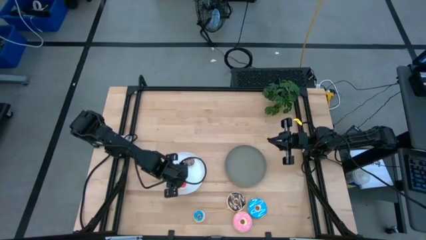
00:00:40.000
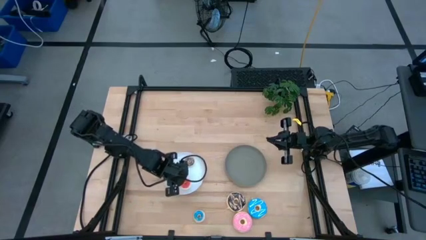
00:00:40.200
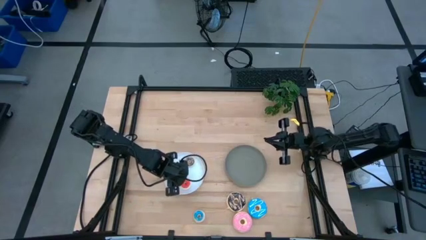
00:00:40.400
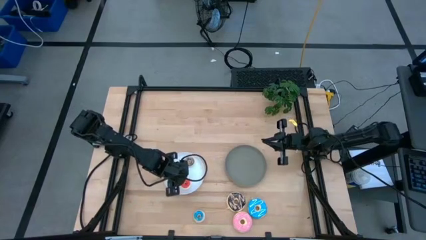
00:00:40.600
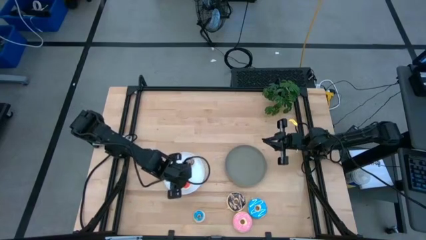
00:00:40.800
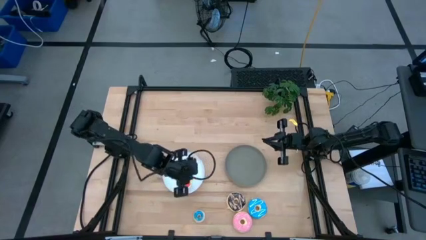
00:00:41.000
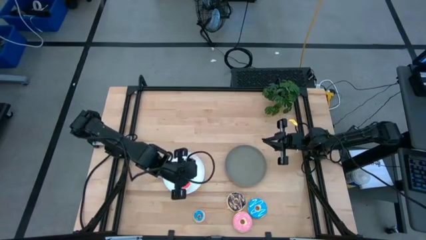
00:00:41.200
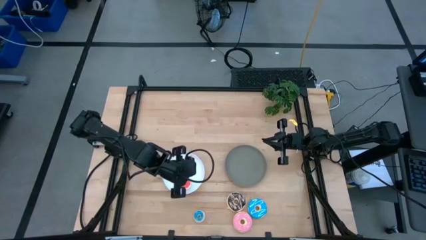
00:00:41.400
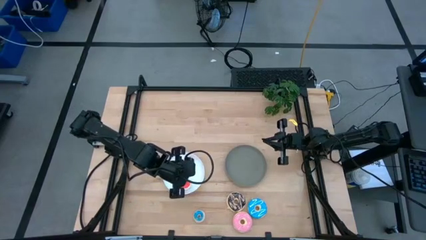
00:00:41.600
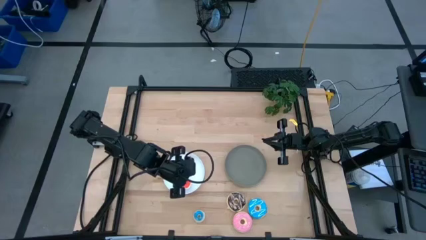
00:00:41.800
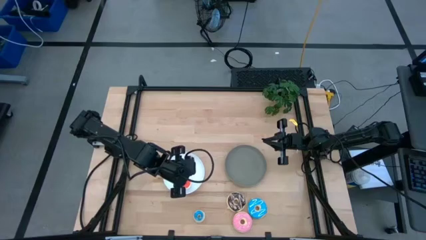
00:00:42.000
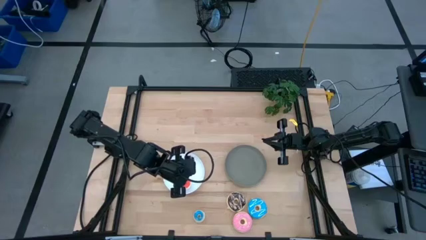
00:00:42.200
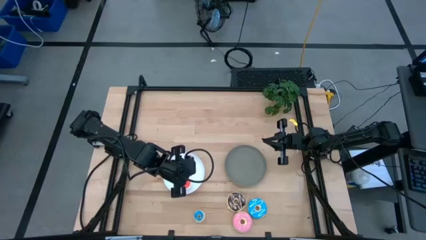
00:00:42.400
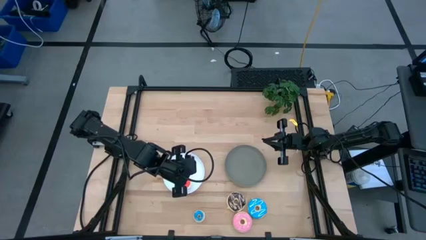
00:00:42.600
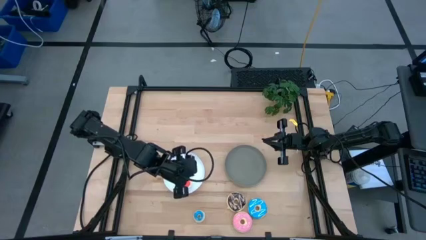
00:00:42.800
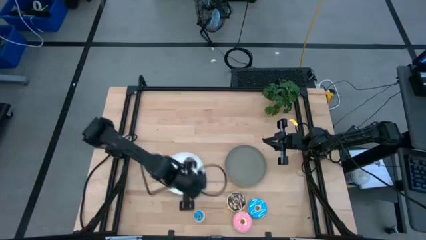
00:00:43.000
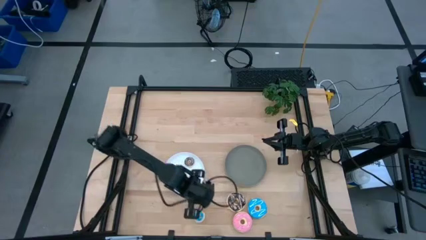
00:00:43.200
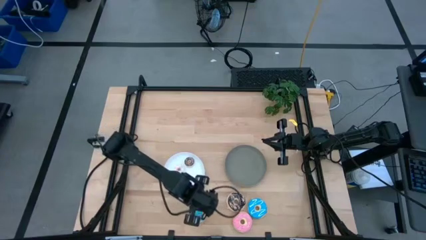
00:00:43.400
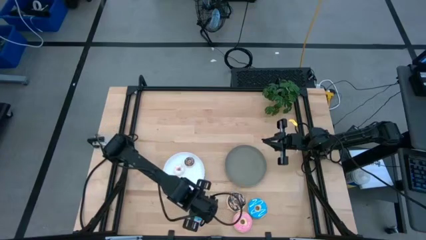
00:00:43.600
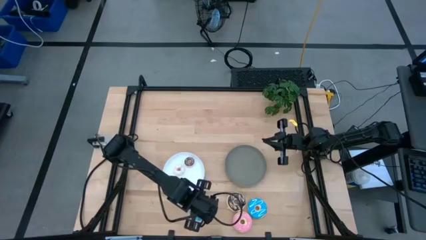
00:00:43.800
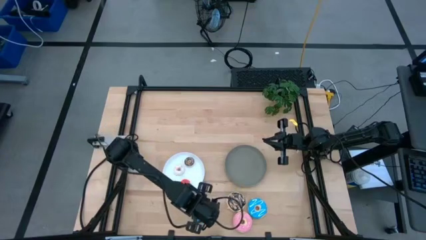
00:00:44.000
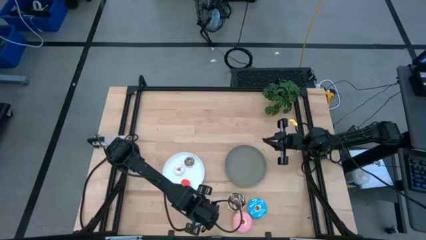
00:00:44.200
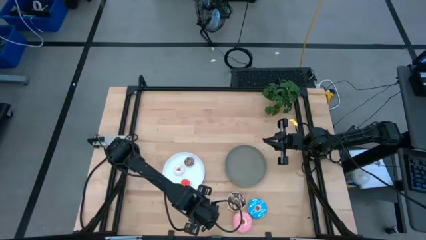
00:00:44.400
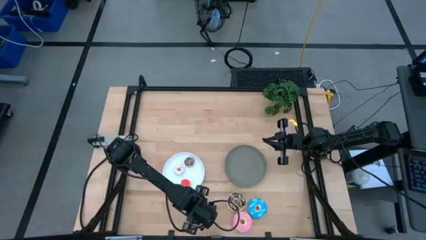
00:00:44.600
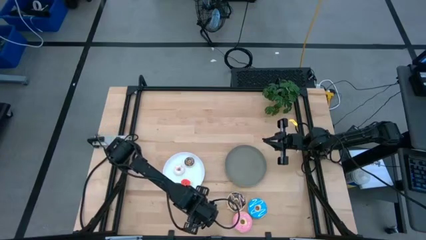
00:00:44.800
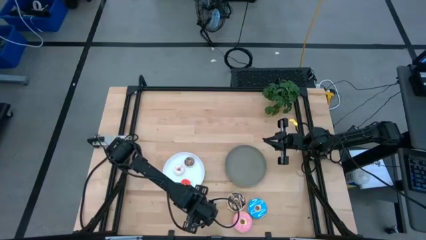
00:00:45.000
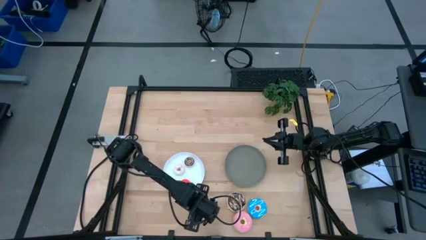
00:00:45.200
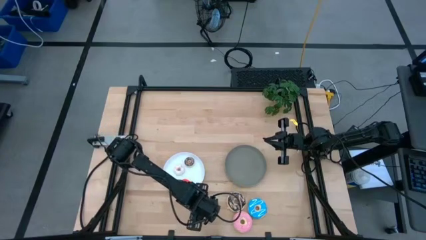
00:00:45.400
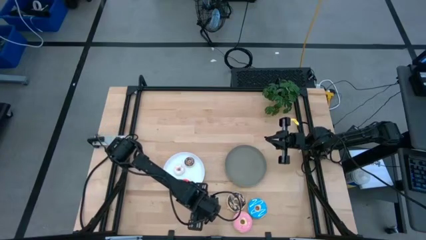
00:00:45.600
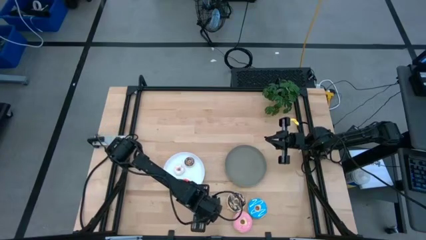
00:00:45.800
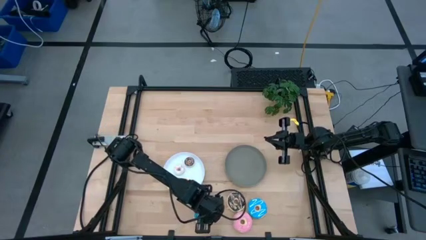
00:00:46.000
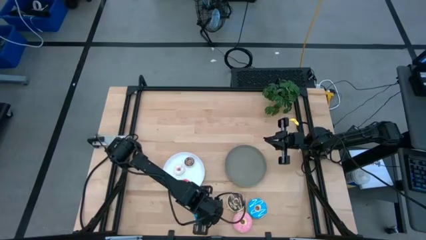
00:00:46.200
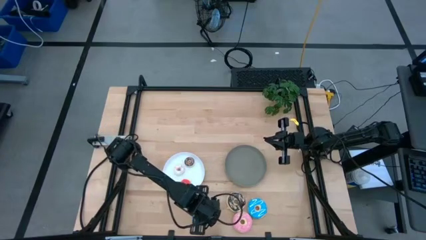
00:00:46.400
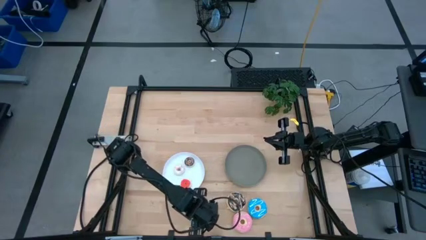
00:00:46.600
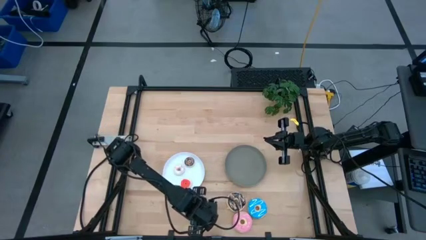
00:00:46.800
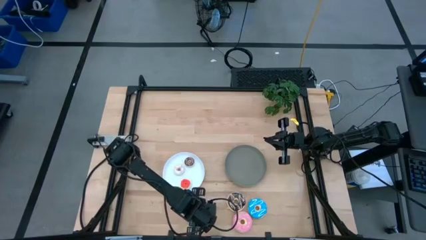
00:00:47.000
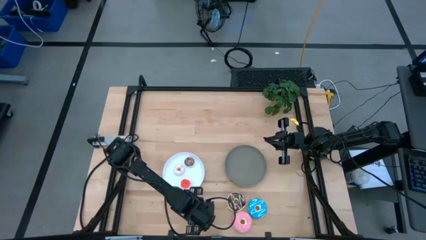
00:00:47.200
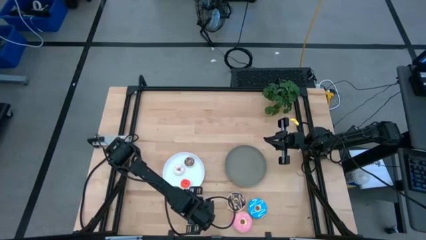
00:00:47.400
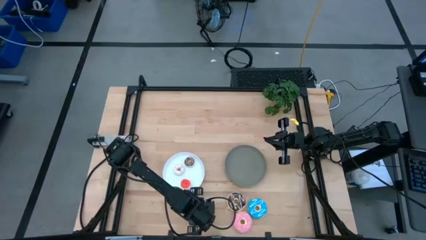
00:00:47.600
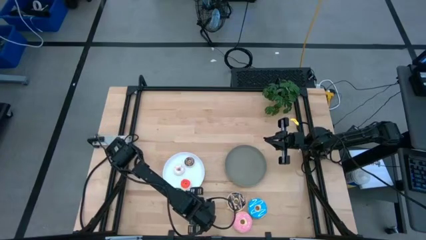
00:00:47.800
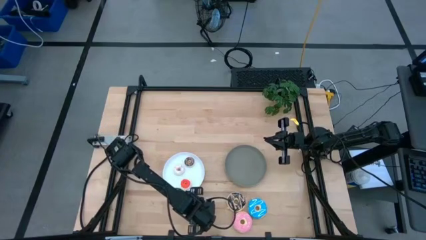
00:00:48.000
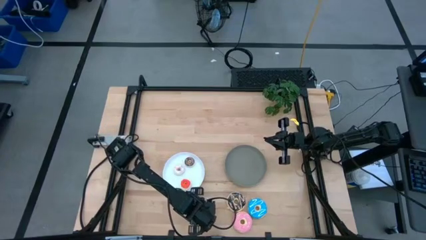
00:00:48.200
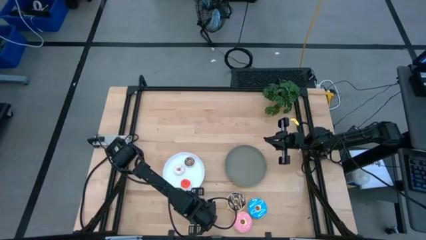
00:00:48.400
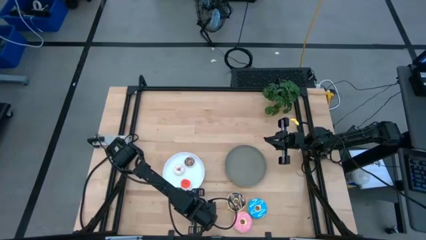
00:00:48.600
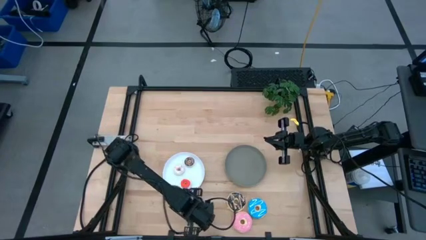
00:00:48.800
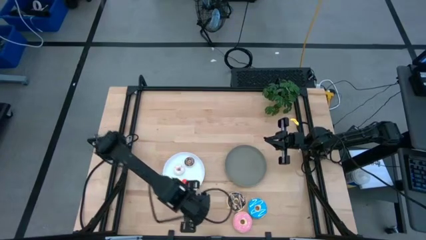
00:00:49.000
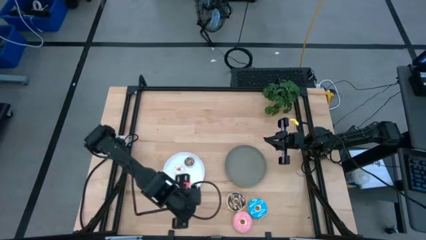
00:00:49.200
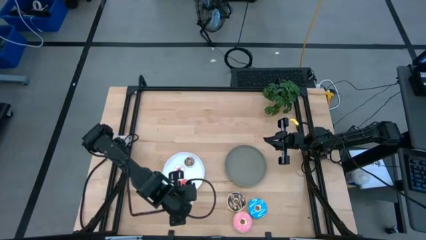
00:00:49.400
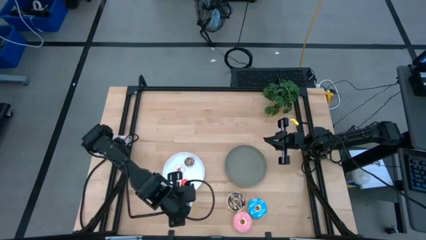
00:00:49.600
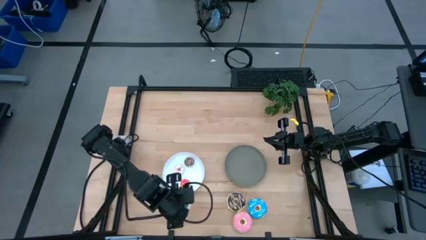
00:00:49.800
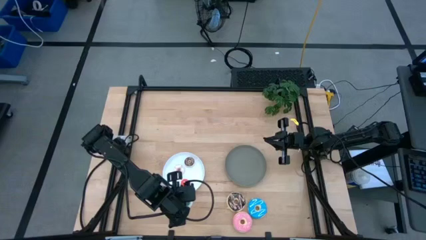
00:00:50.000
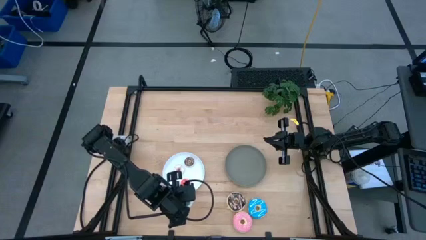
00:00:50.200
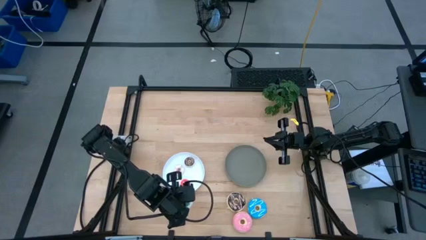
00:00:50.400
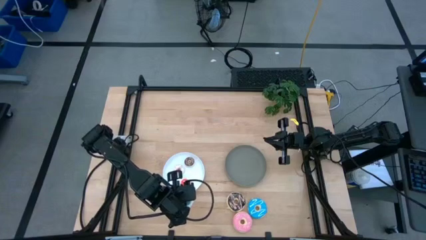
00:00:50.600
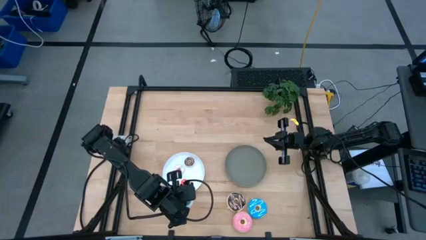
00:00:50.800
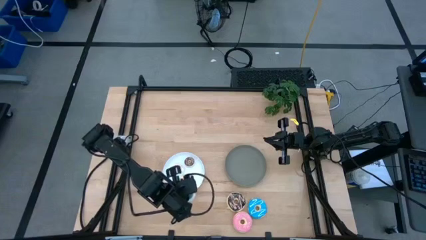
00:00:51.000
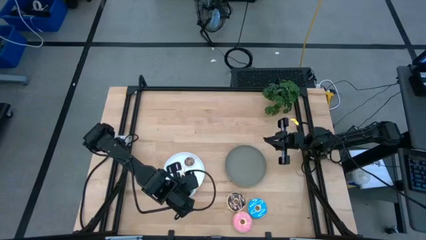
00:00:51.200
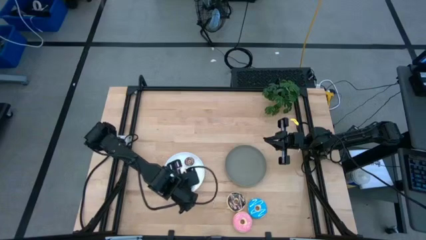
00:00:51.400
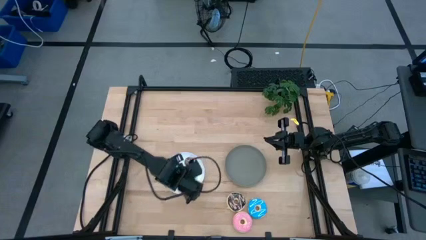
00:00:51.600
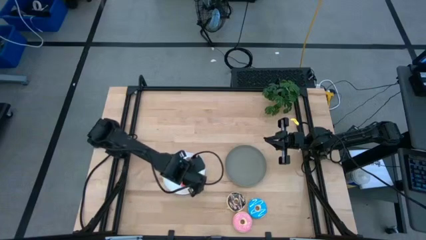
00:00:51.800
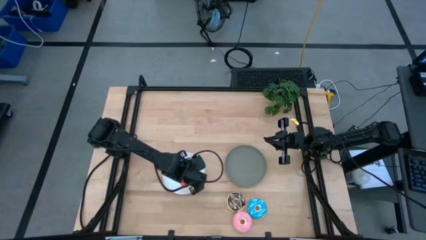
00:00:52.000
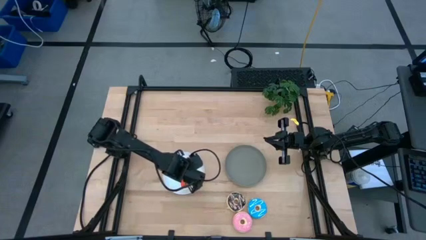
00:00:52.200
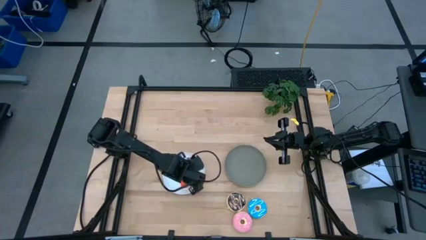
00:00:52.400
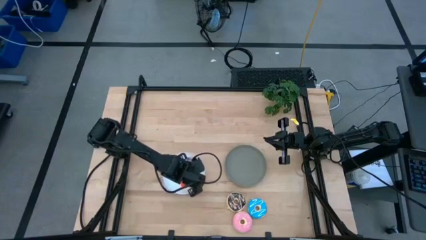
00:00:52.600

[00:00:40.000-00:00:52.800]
Task: Pick & Place donuts
Put the mini blue donut on the white plate
